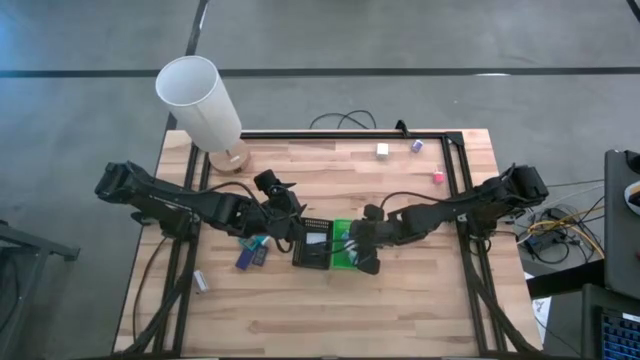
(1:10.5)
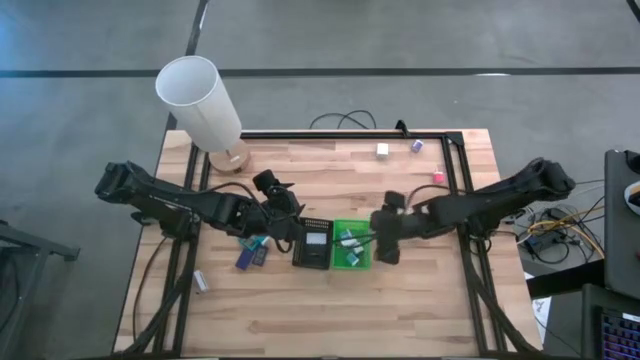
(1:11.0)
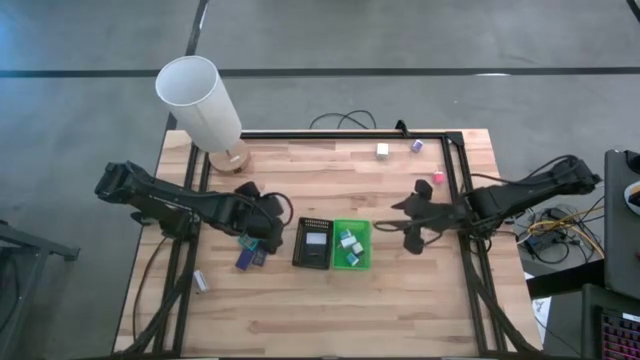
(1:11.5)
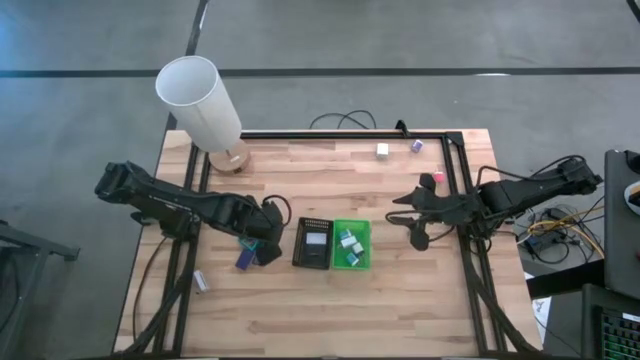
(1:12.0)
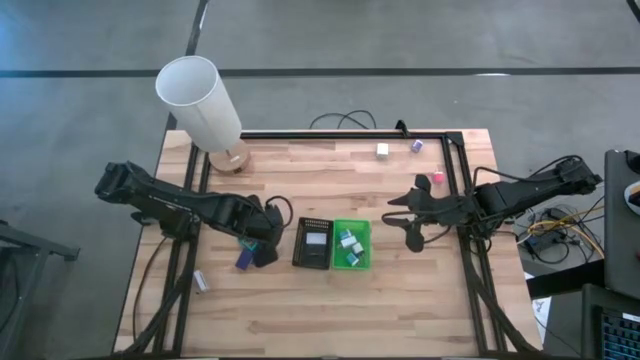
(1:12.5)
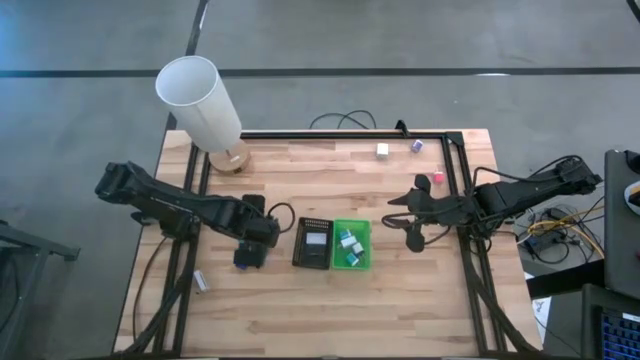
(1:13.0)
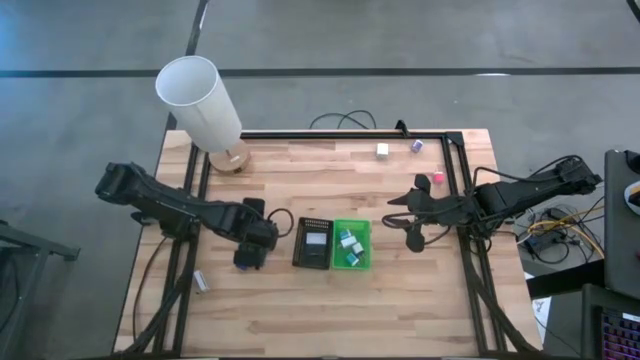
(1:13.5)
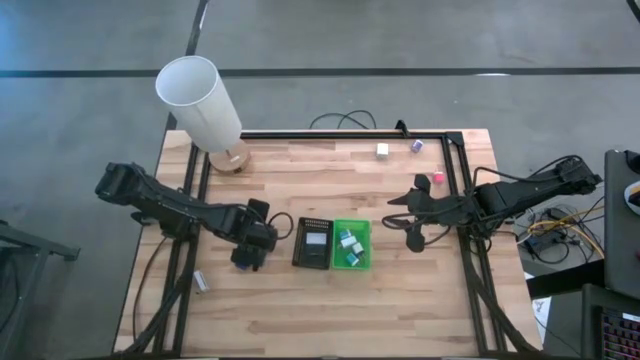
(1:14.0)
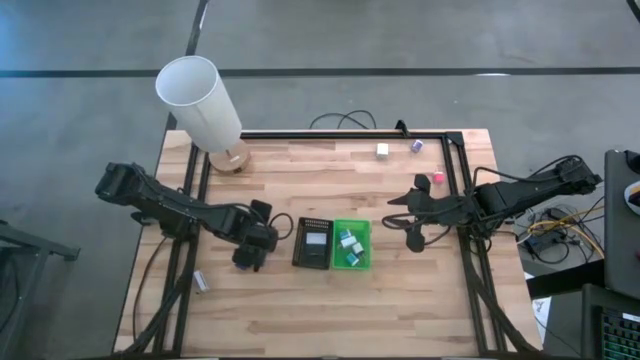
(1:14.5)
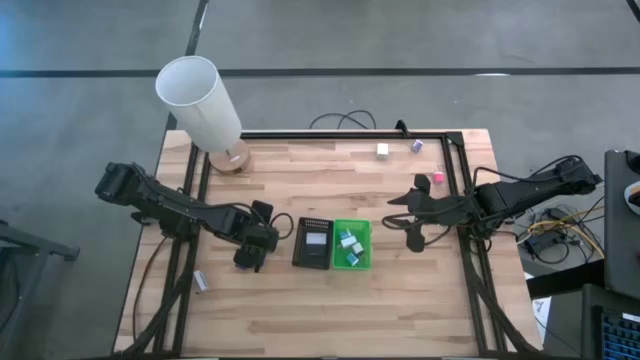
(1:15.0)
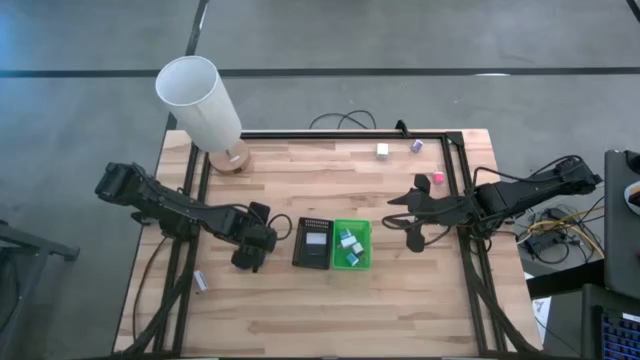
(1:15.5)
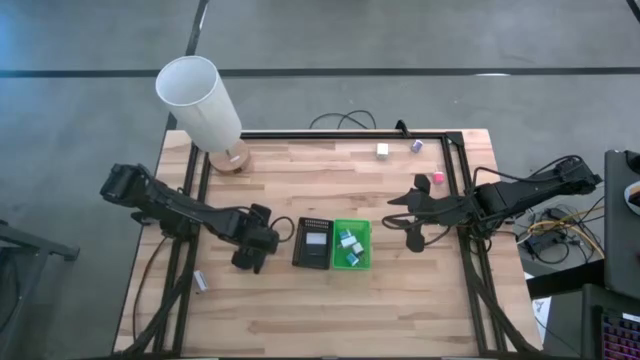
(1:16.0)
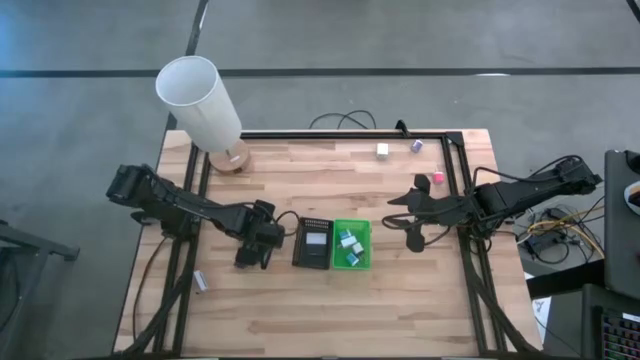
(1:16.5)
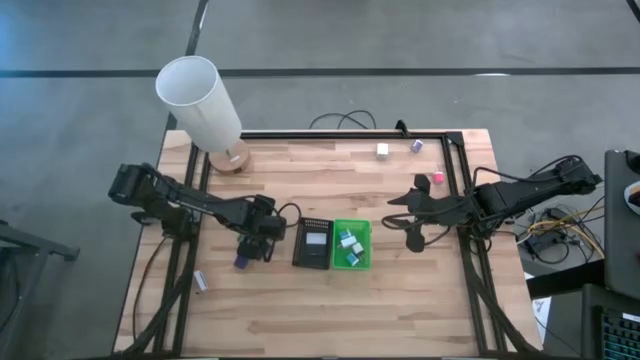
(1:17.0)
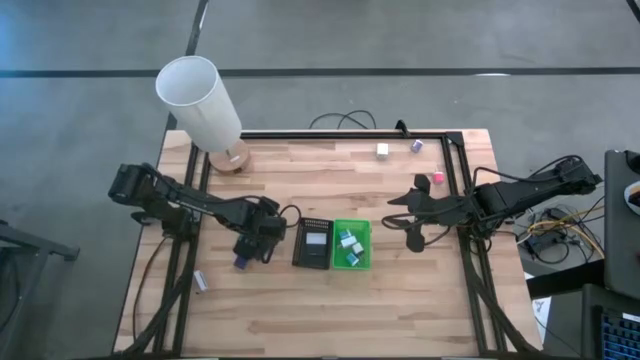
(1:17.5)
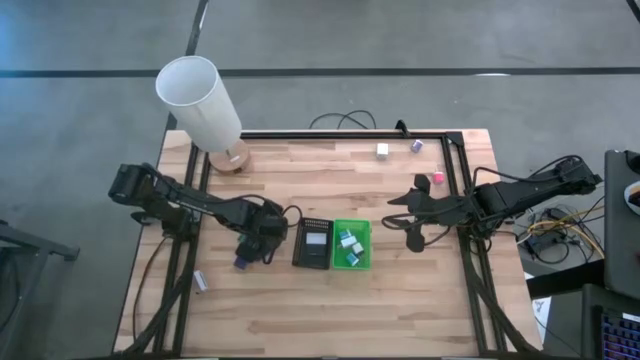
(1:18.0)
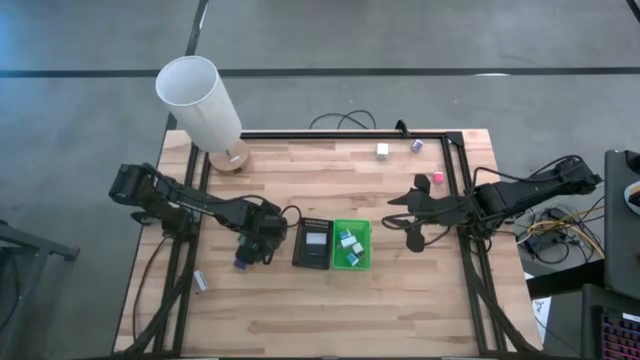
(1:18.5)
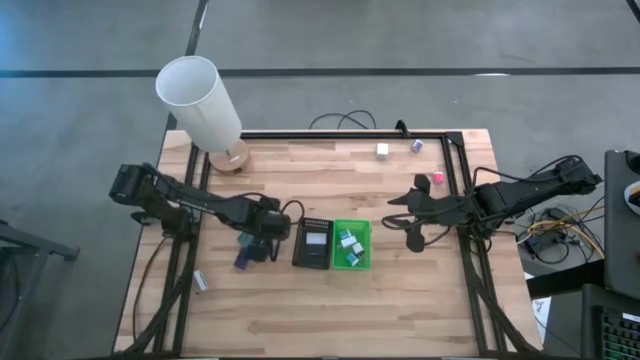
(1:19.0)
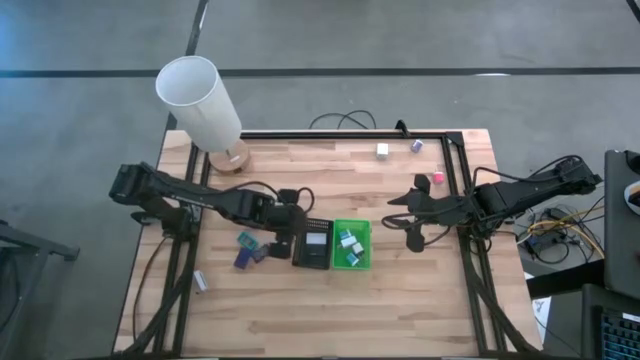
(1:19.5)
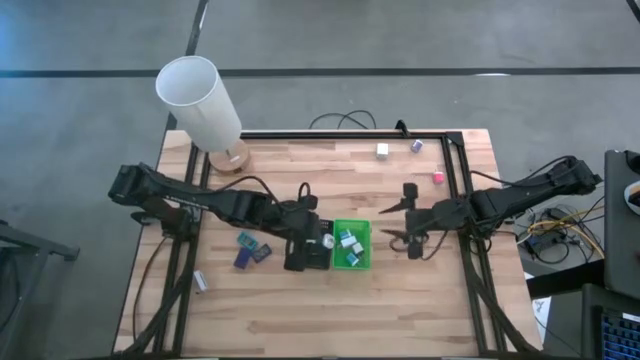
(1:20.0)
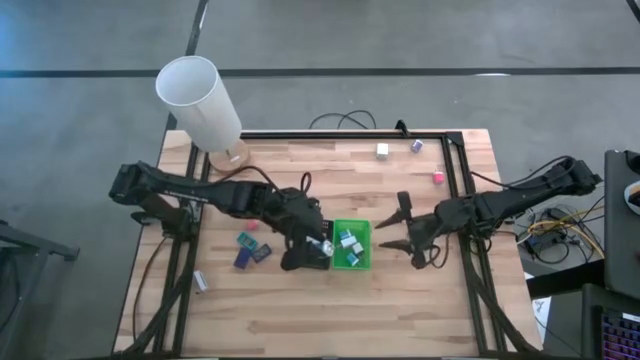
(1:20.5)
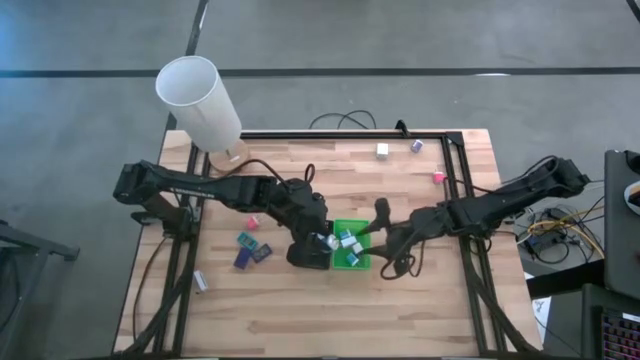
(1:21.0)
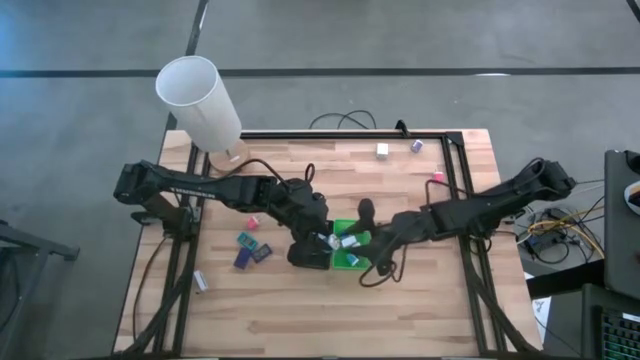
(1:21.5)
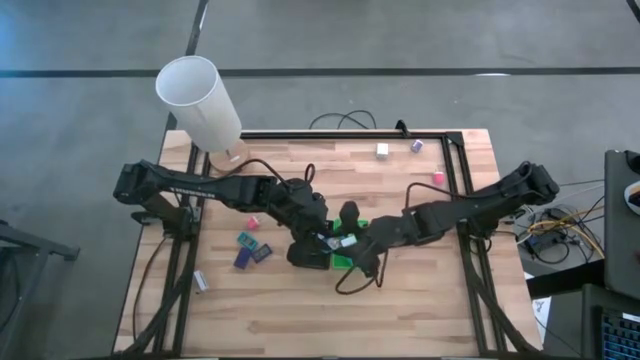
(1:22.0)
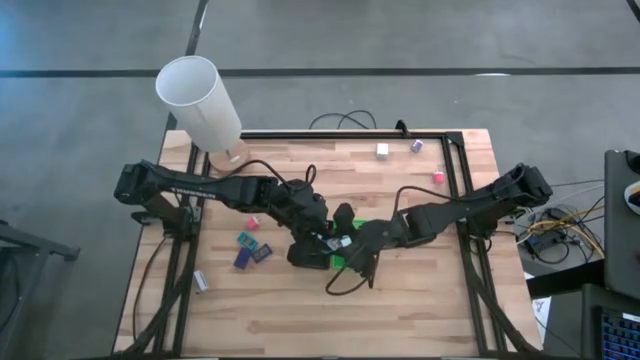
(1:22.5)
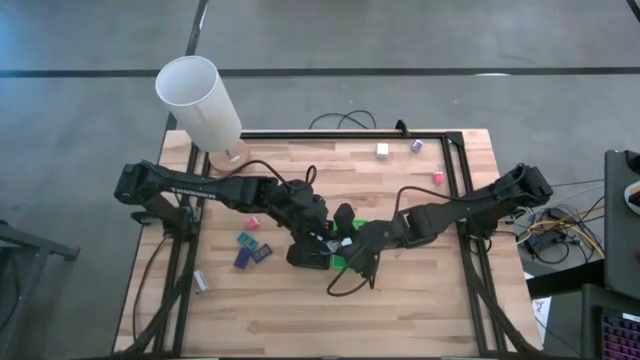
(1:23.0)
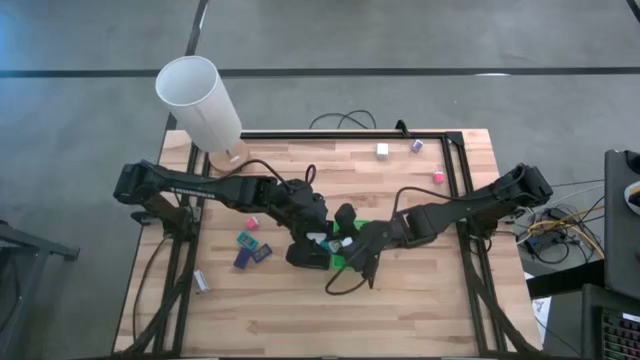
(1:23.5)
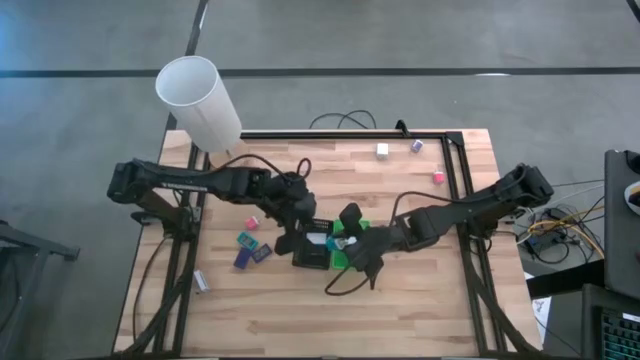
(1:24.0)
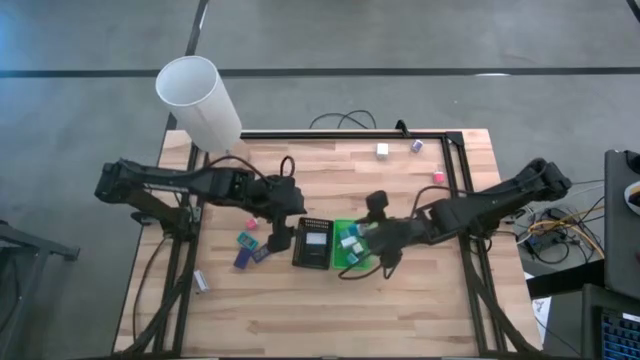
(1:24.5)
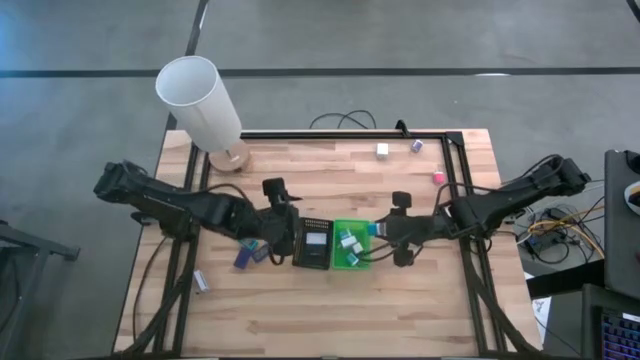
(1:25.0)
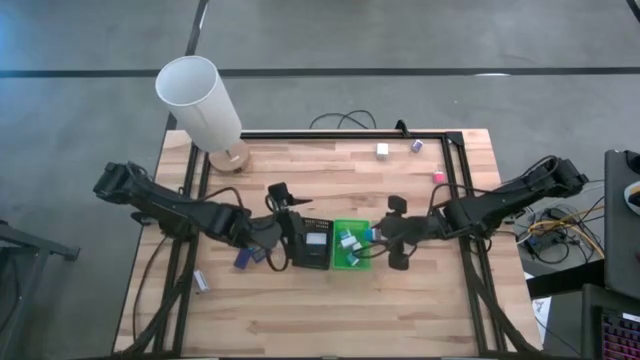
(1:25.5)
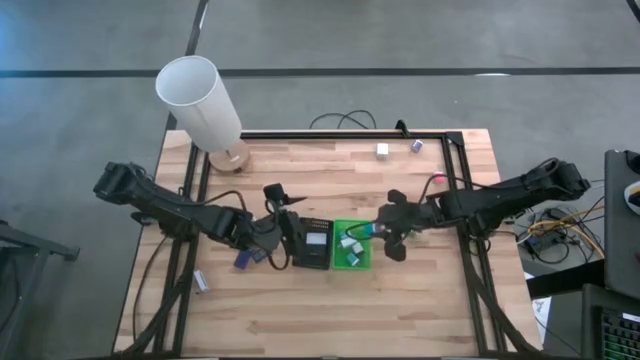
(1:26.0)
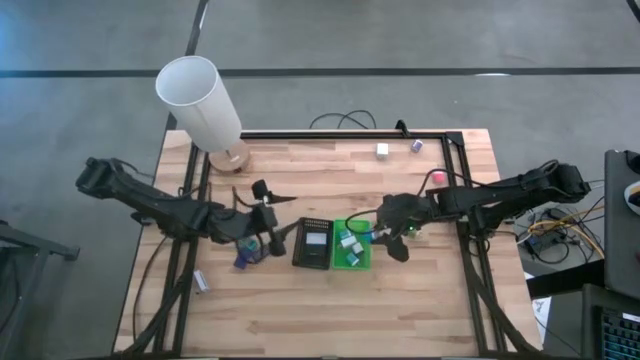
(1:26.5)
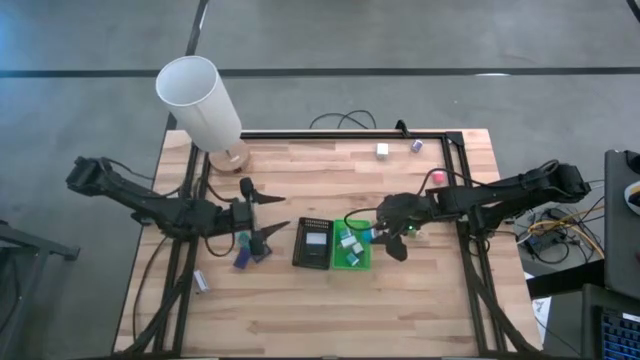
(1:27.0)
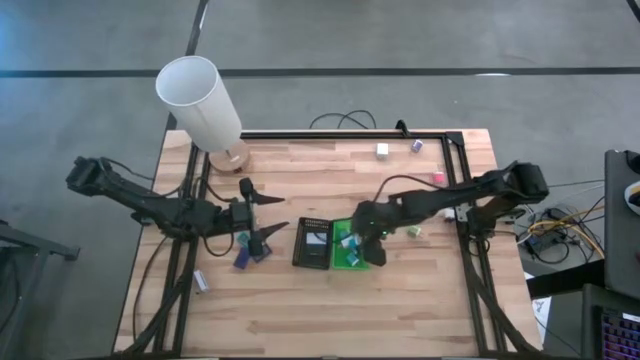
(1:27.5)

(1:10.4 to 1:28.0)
Task: Pick & Place Office items
Put the blue charger adapter into the green basket

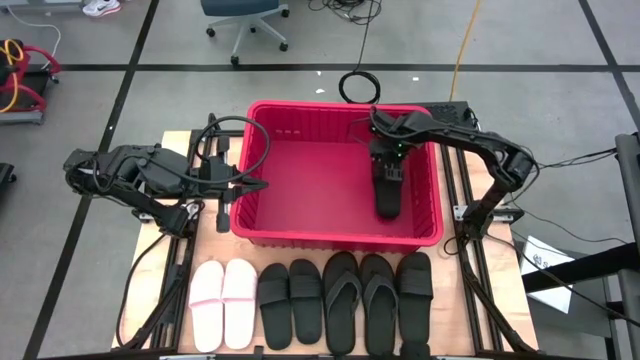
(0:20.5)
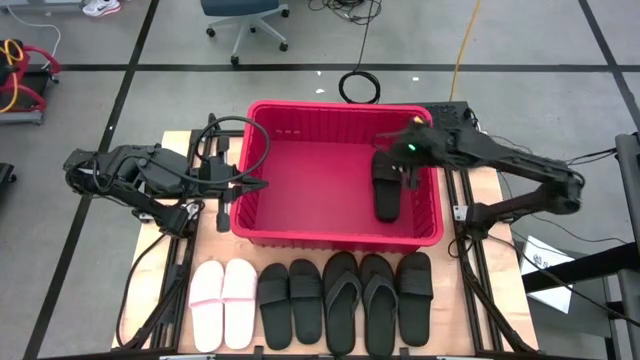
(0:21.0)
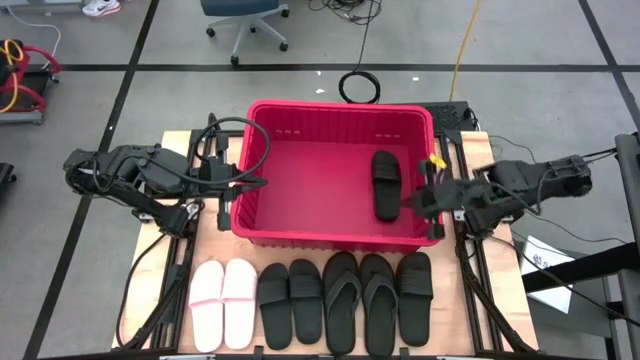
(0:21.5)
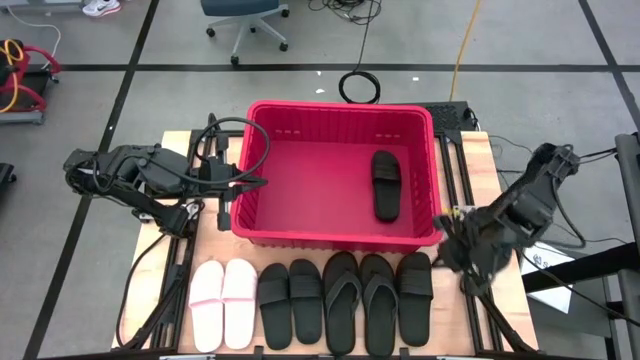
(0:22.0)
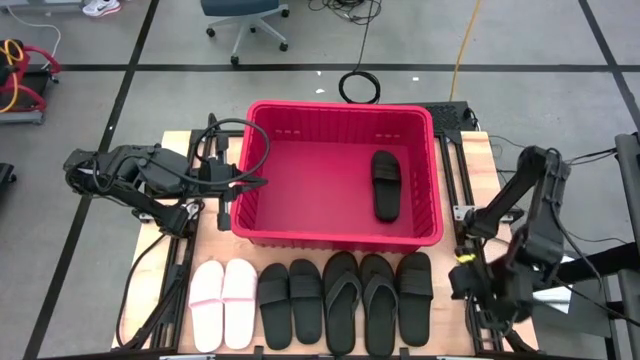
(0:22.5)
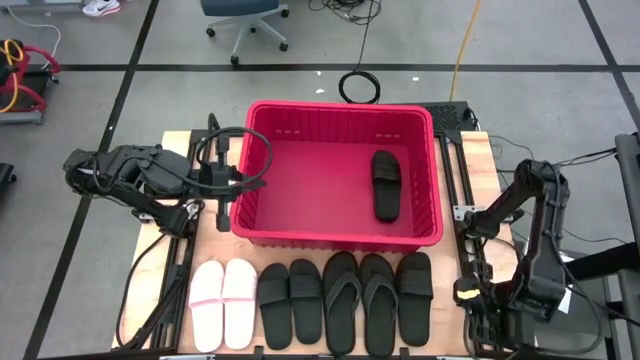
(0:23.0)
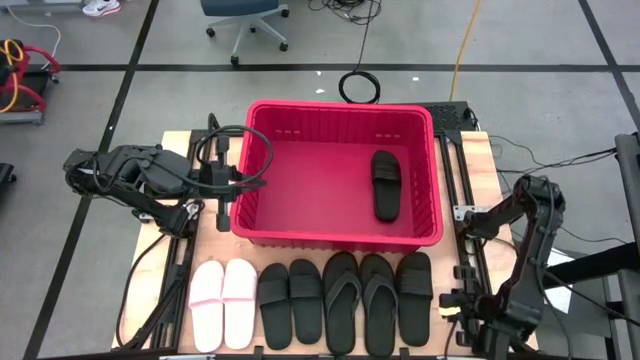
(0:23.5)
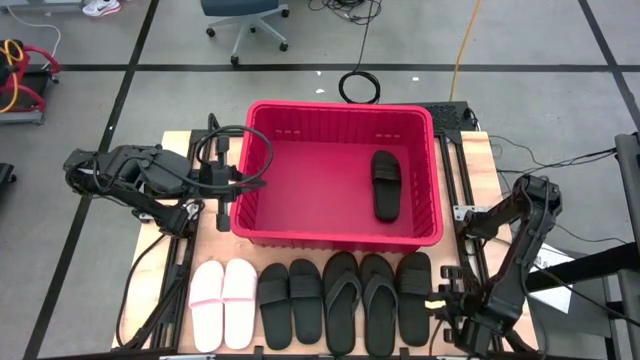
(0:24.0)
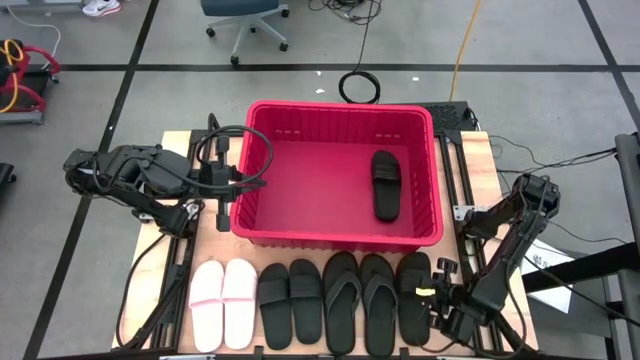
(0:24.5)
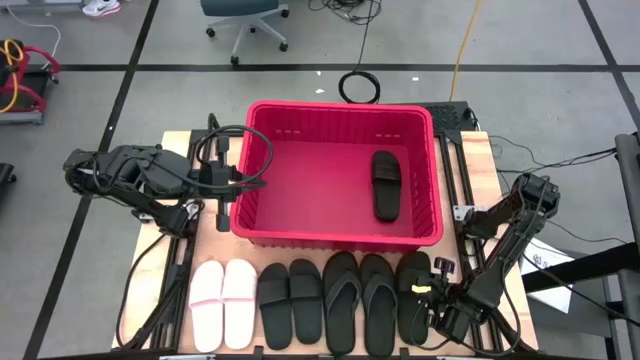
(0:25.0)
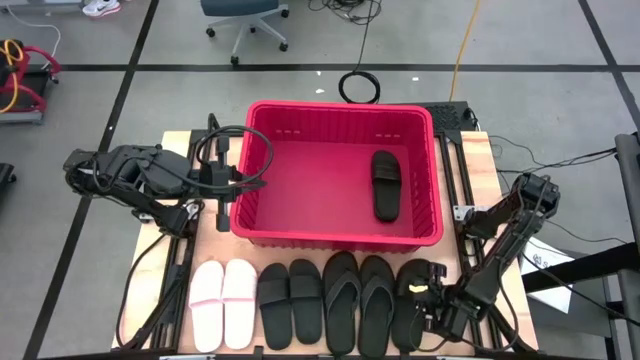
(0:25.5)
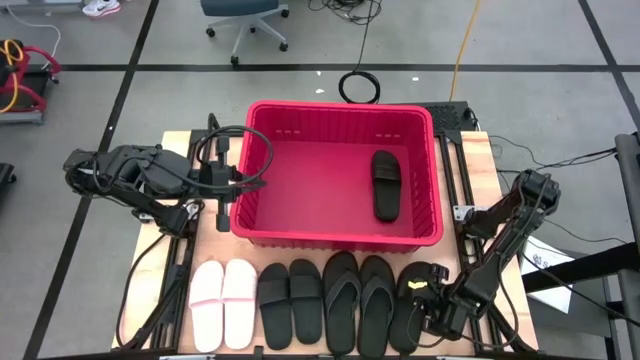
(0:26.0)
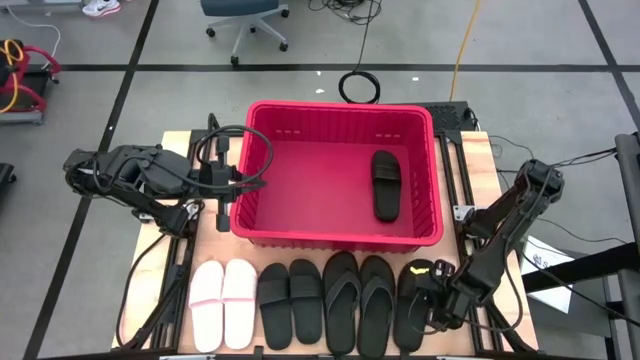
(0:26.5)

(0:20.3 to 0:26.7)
Task: Pick and place slides into bin
Put the black slide into the red bin
